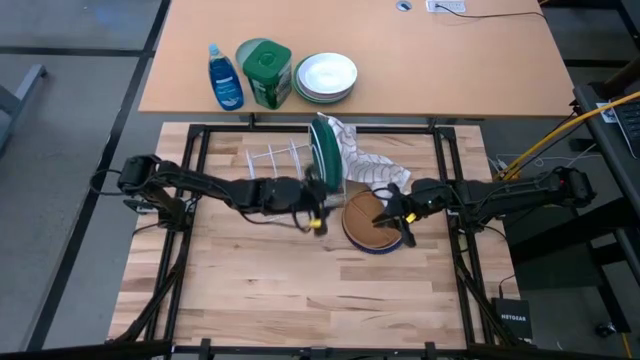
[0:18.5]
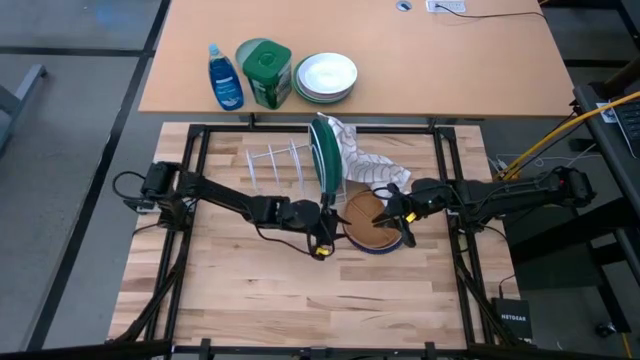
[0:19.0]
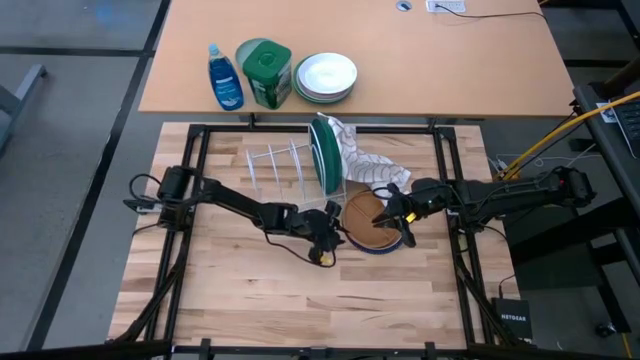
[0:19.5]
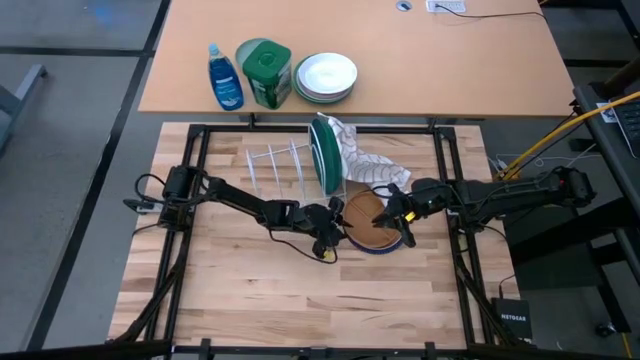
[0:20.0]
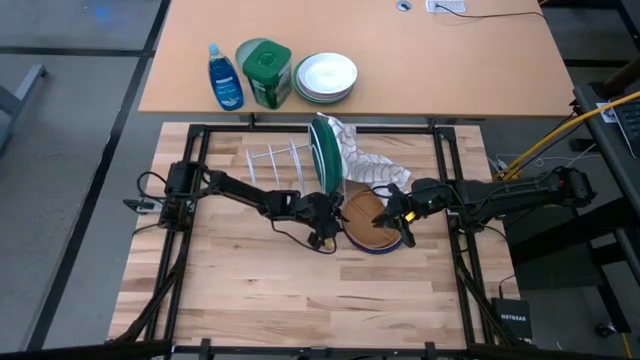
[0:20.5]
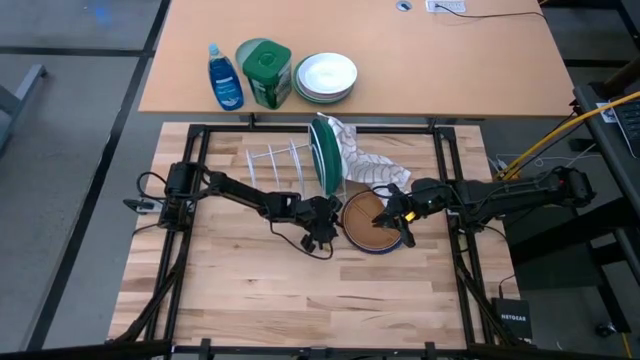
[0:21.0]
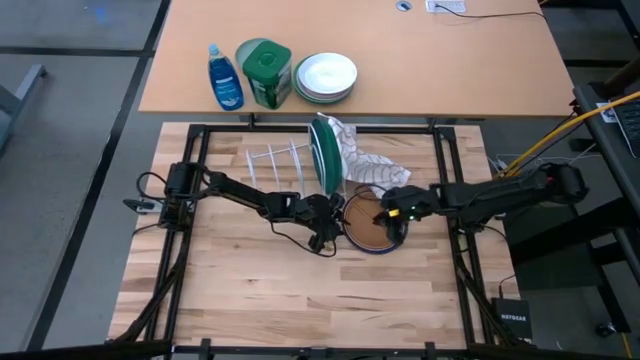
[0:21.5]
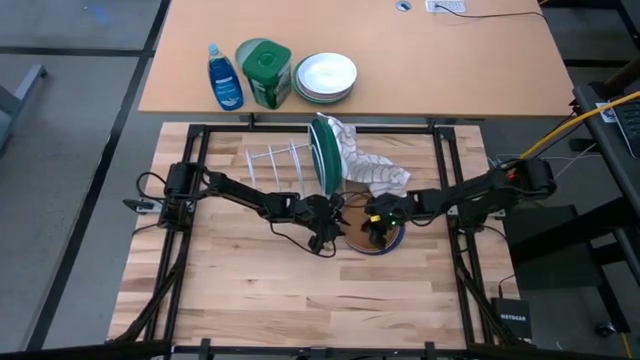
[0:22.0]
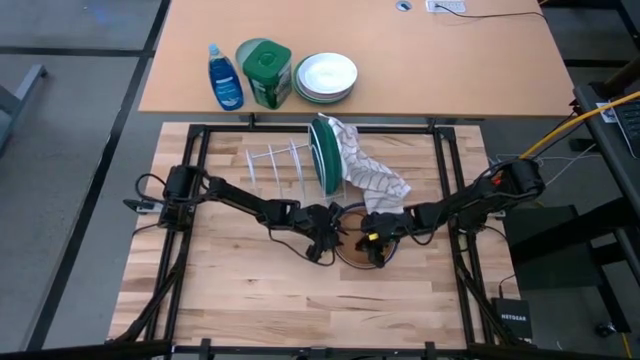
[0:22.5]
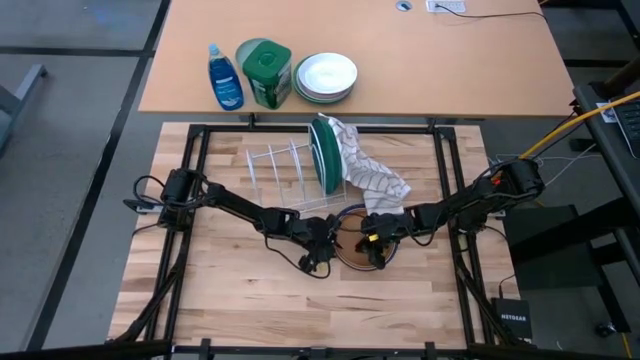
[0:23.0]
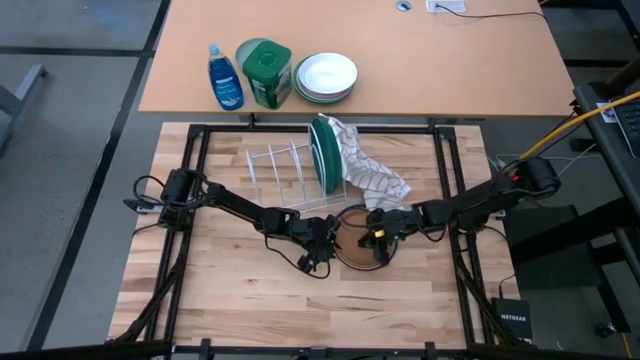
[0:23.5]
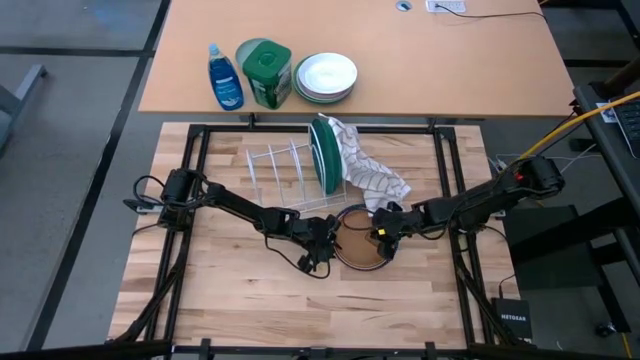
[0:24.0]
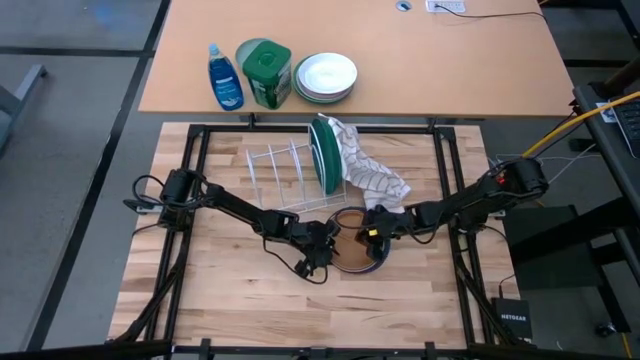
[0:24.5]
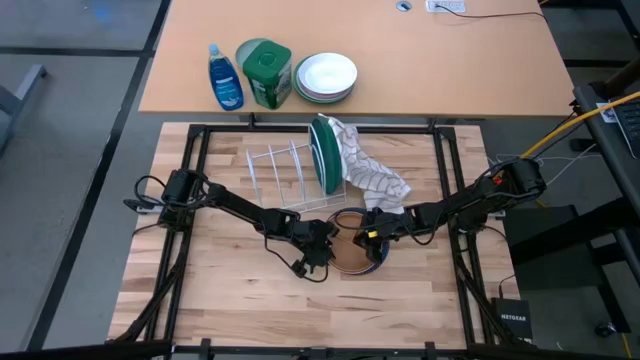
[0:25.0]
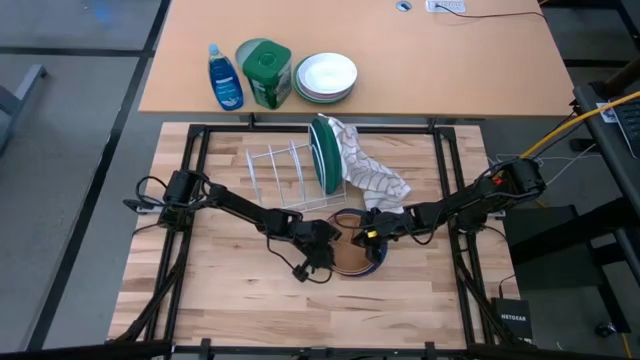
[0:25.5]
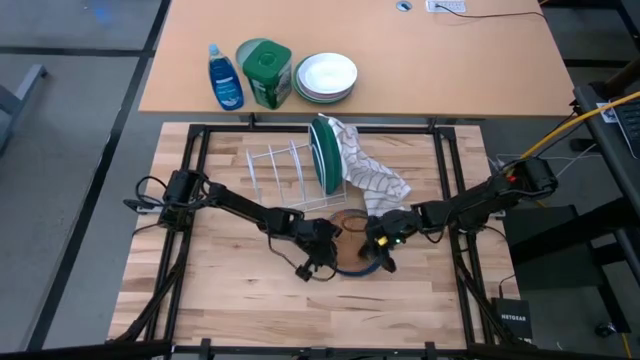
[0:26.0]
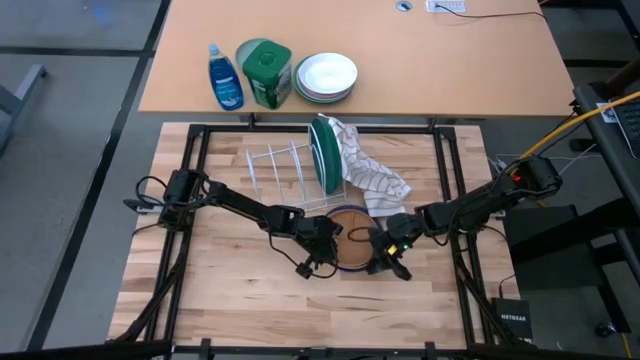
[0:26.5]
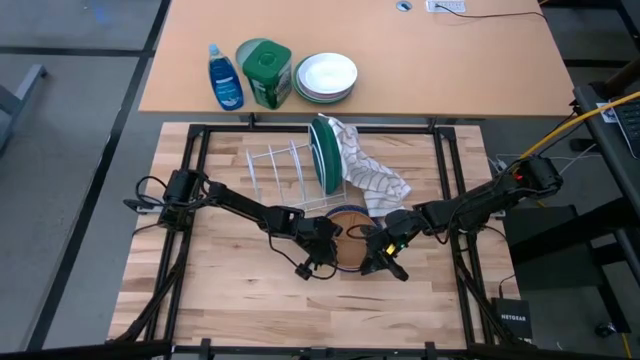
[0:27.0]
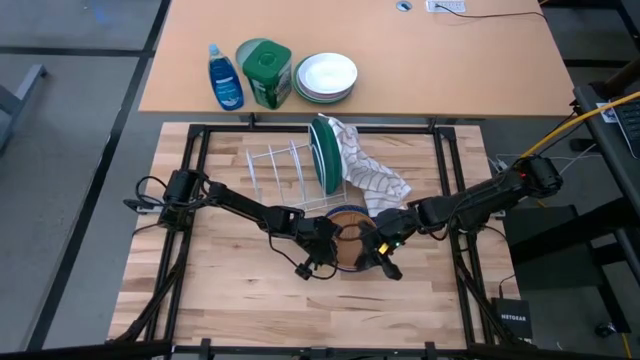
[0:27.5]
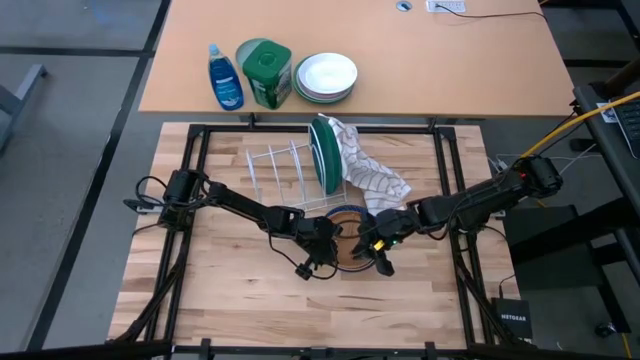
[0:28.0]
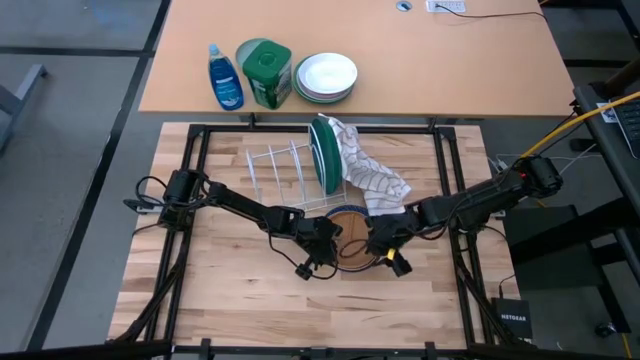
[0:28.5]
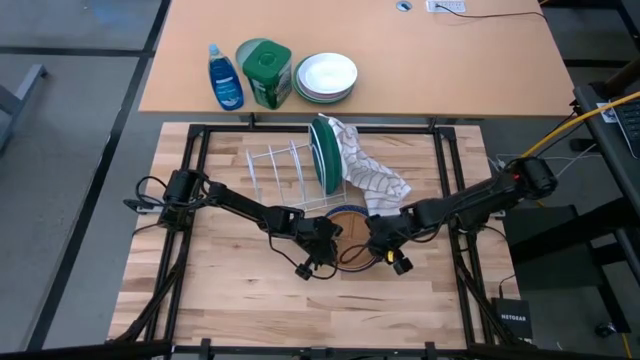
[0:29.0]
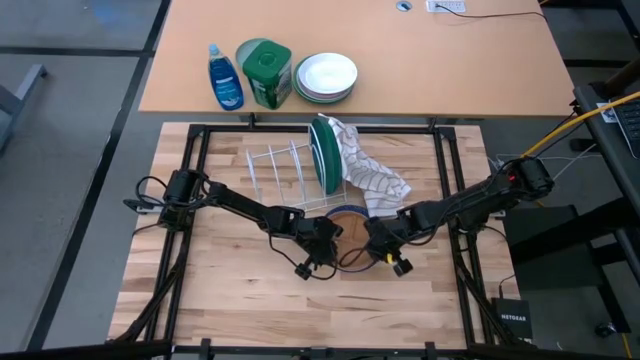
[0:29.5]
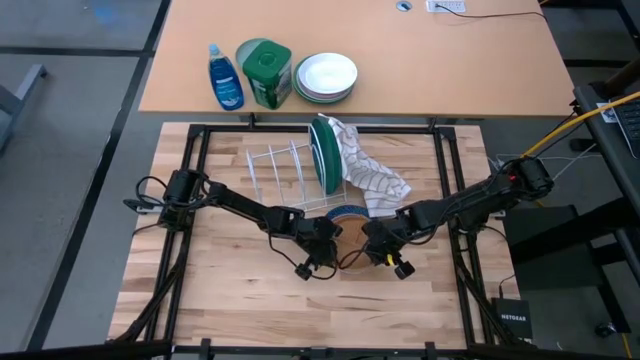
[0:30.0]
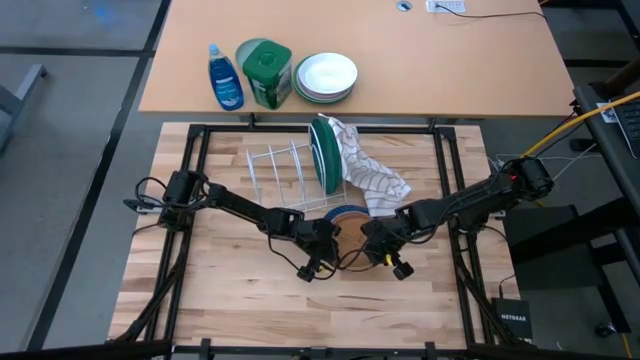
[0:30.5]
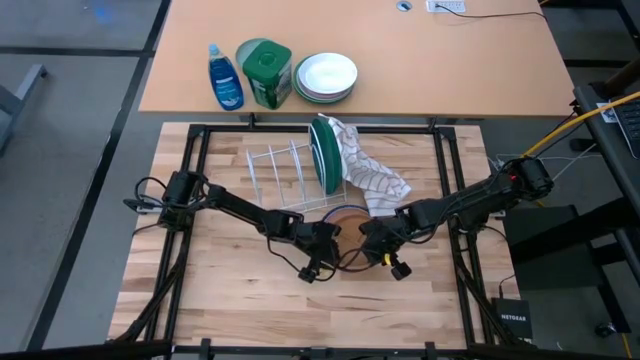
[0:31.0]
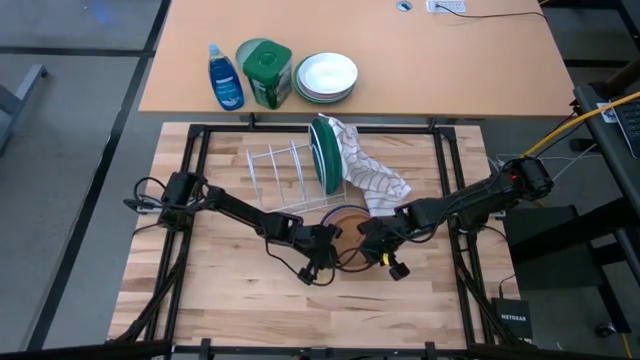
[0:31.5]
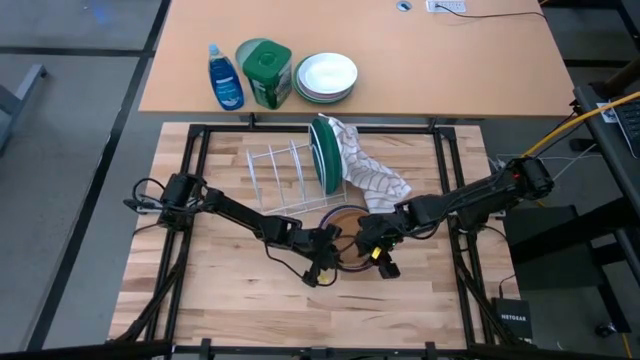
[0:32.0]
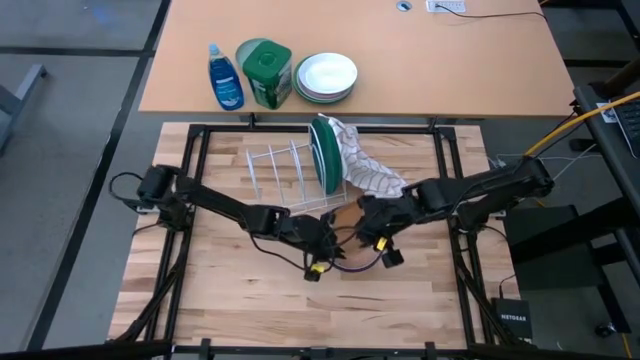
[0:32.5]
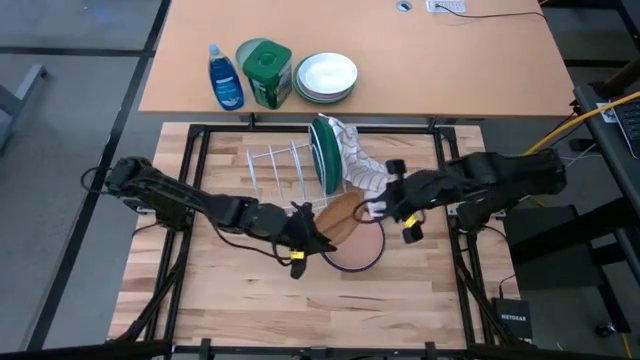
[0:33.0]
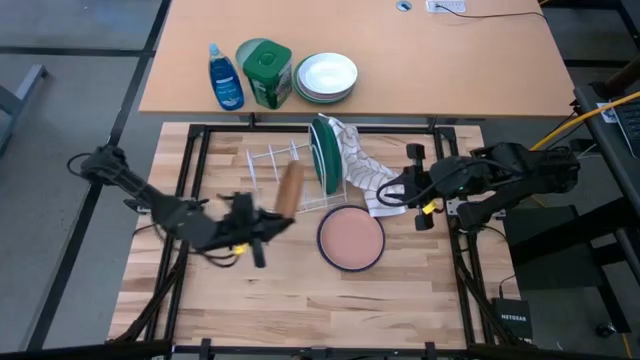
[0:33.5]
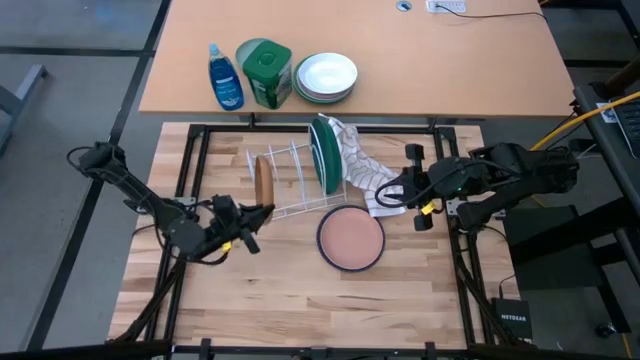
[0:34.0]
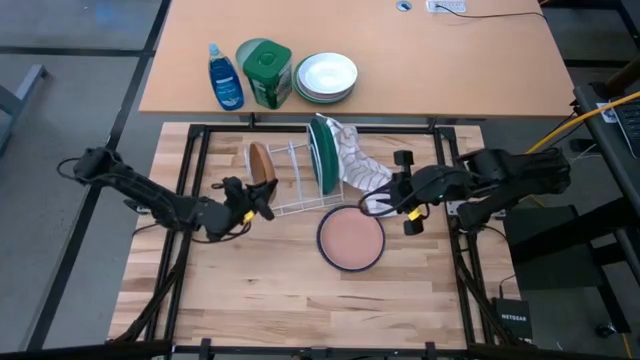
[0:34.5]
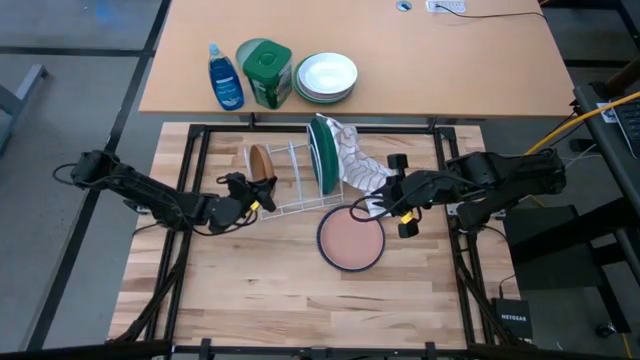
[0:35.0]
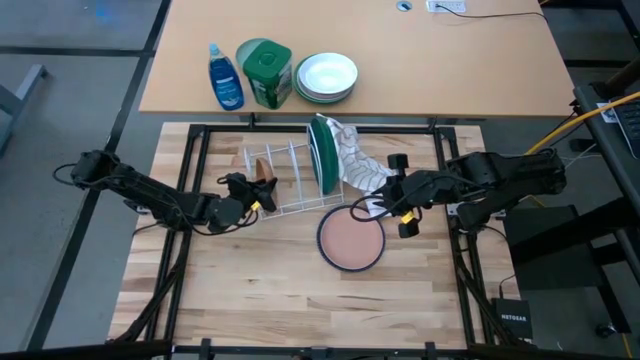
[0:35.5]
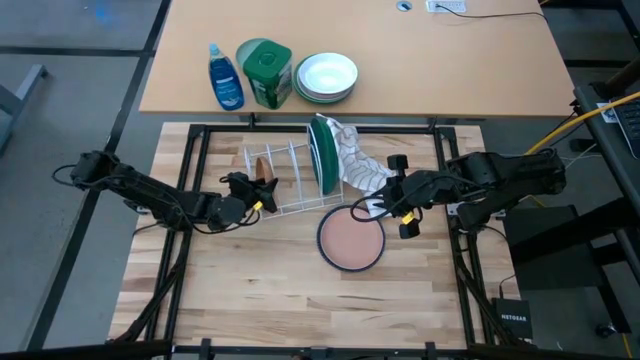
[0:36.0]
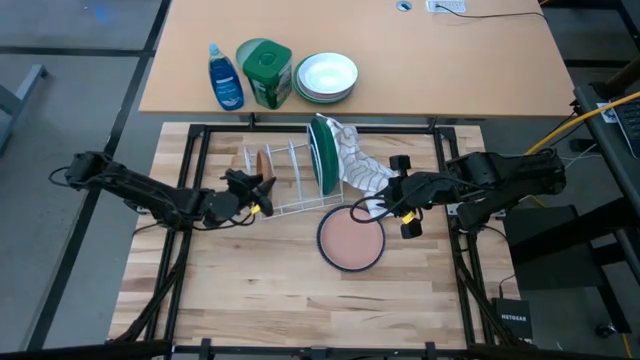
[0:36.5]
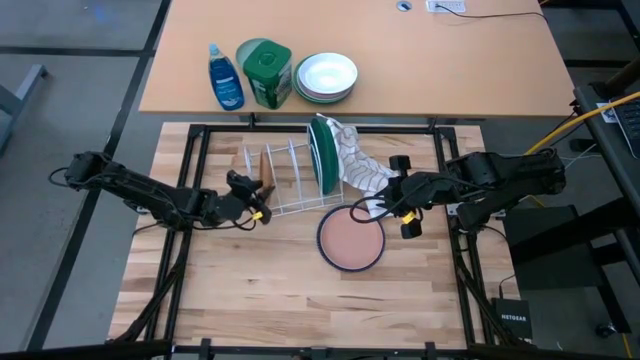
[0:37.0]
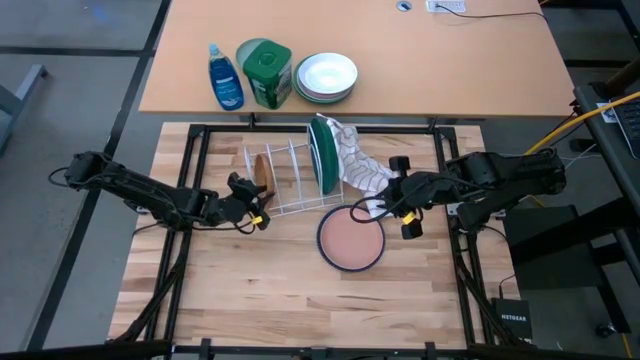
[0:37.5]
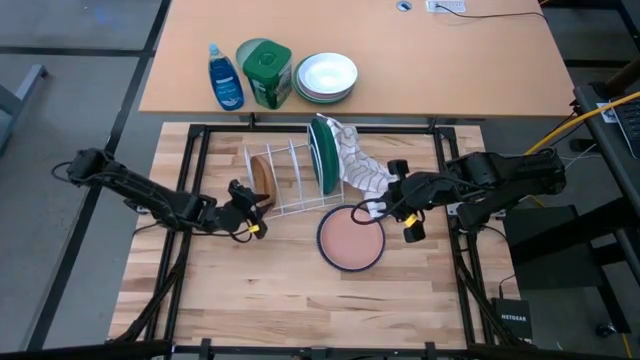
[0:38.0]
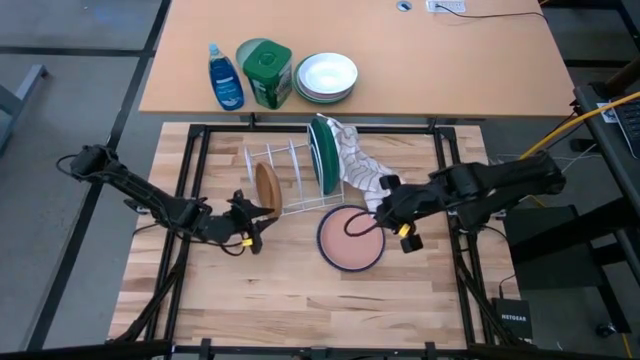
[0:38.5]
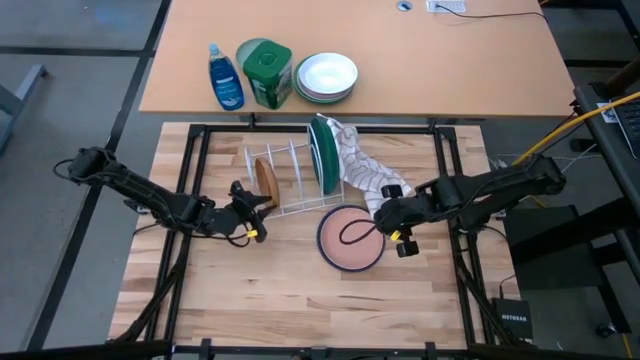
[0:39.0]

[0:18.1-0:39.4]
Task: Sort dishes
Put the brown plate into the dish rack
